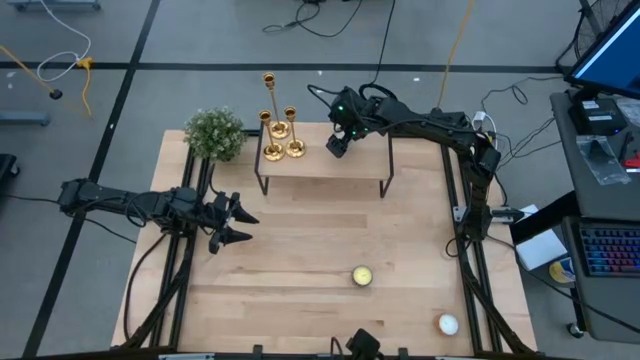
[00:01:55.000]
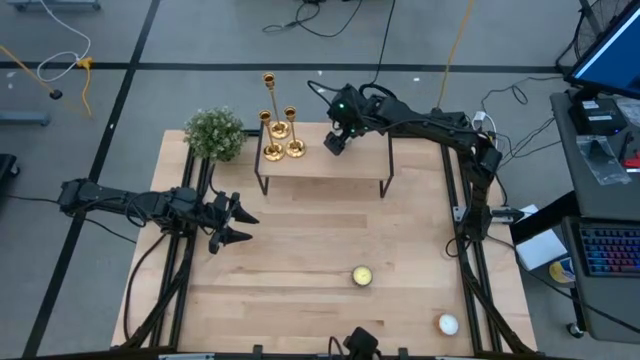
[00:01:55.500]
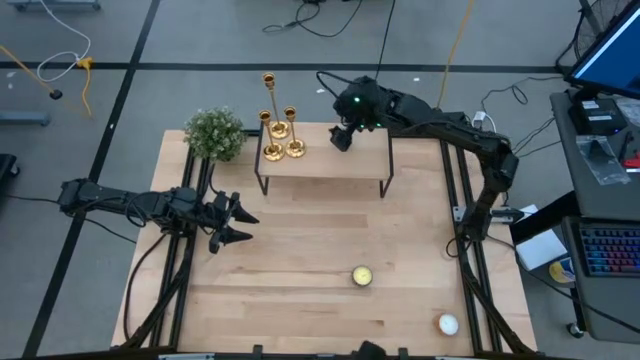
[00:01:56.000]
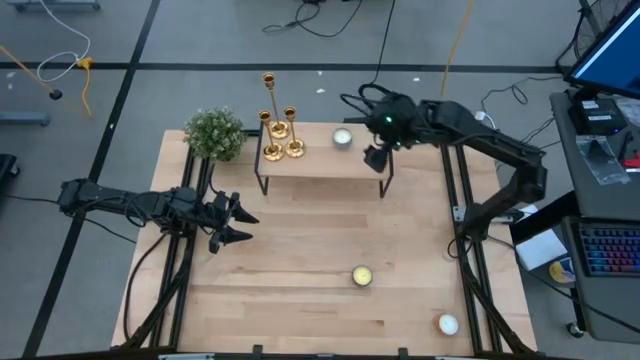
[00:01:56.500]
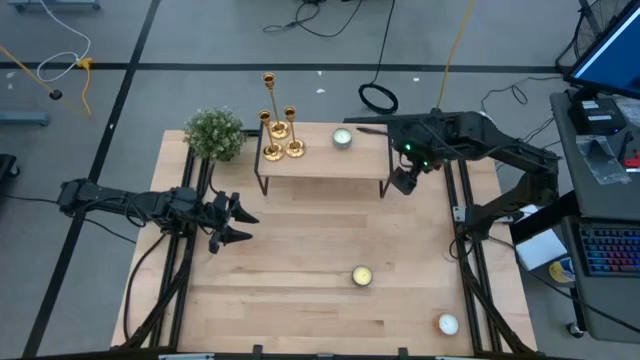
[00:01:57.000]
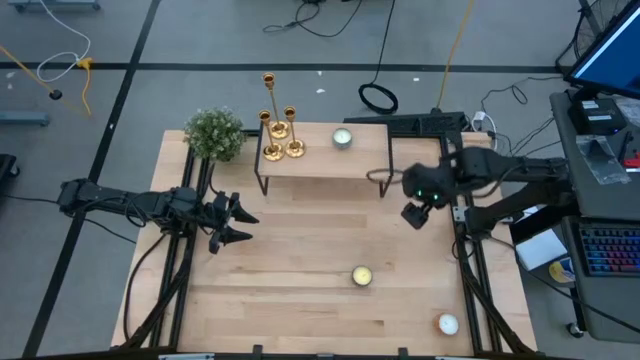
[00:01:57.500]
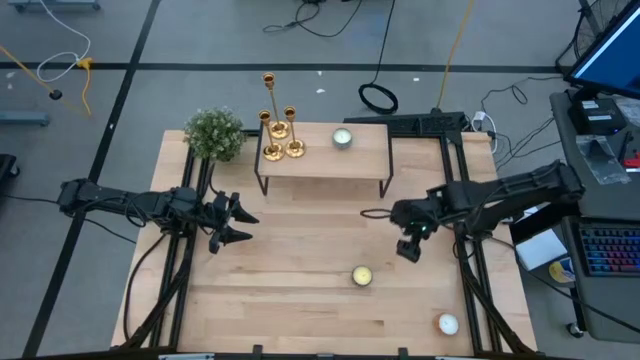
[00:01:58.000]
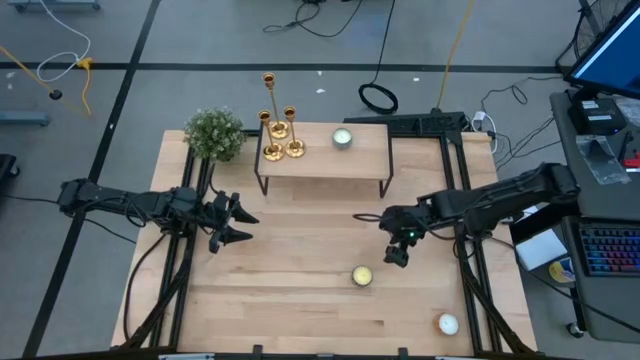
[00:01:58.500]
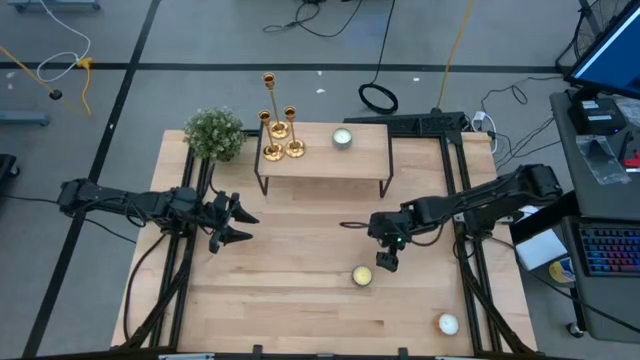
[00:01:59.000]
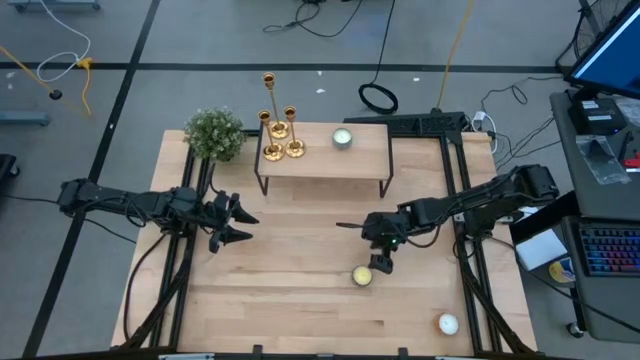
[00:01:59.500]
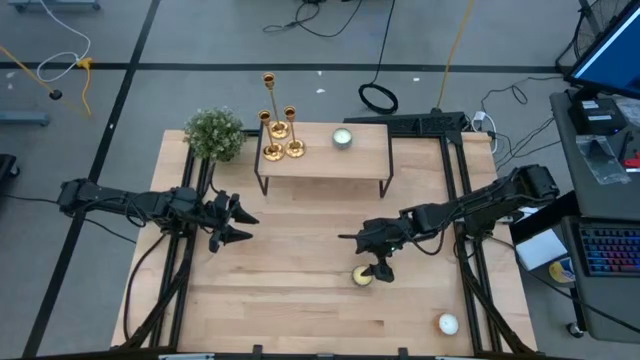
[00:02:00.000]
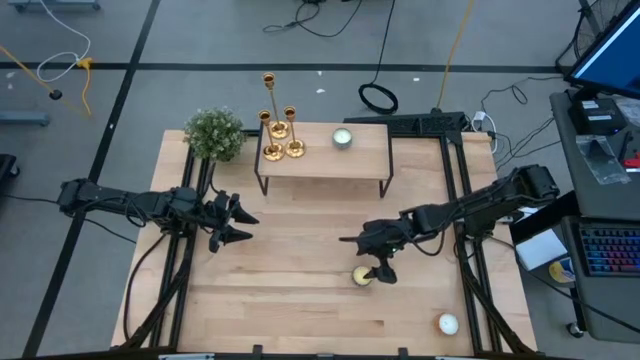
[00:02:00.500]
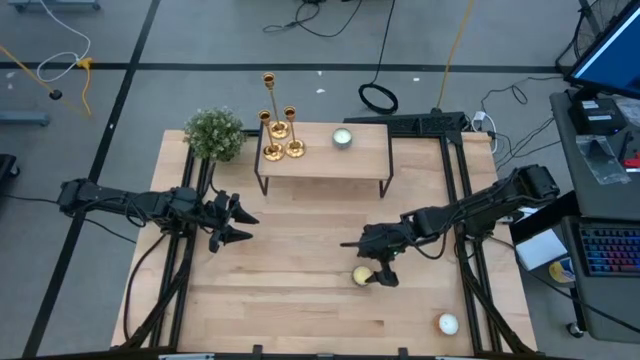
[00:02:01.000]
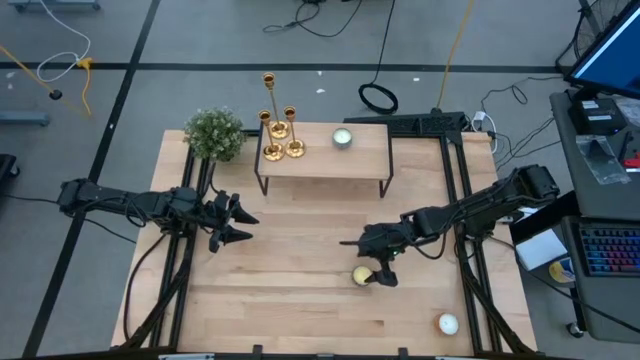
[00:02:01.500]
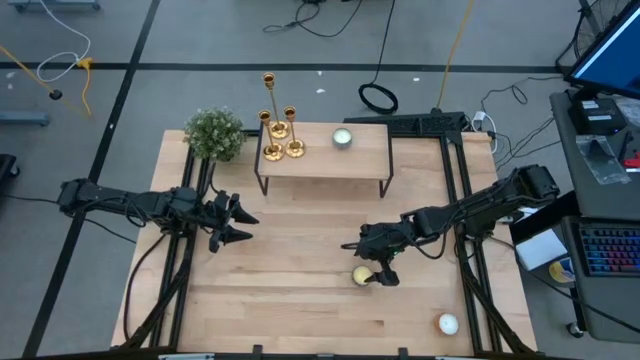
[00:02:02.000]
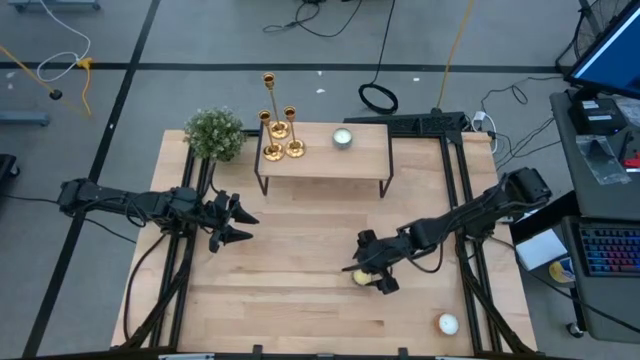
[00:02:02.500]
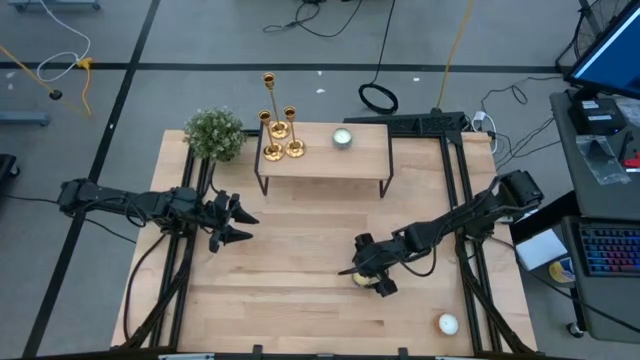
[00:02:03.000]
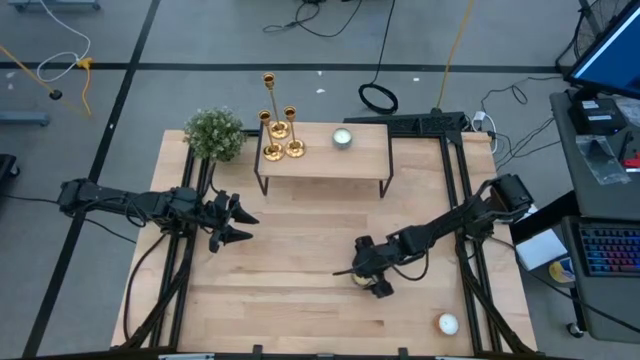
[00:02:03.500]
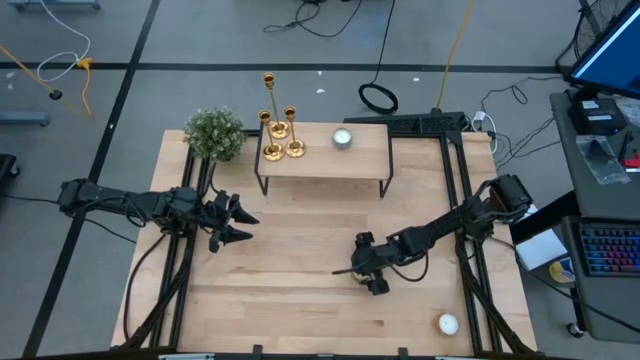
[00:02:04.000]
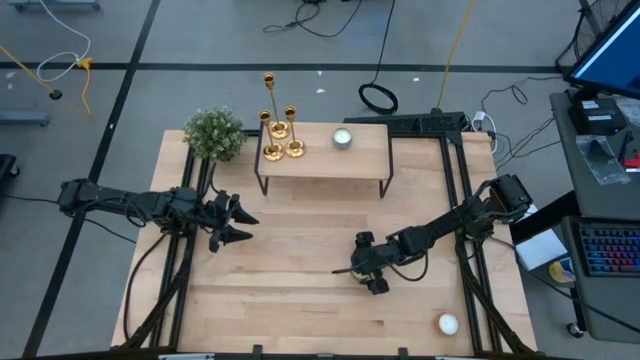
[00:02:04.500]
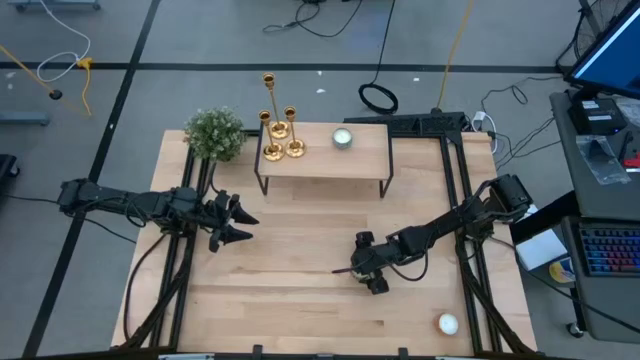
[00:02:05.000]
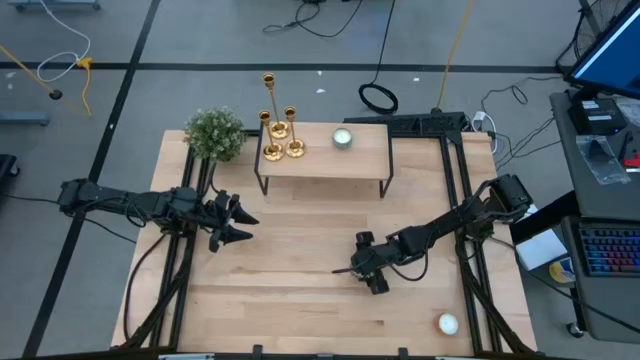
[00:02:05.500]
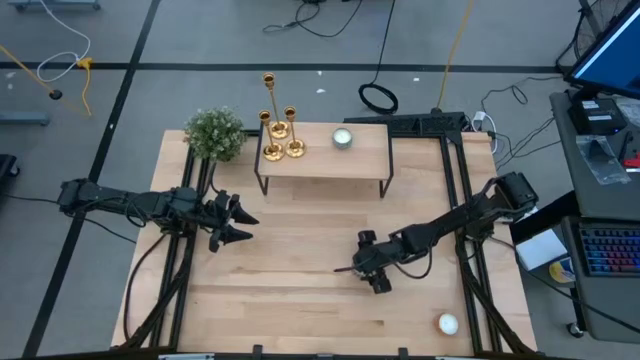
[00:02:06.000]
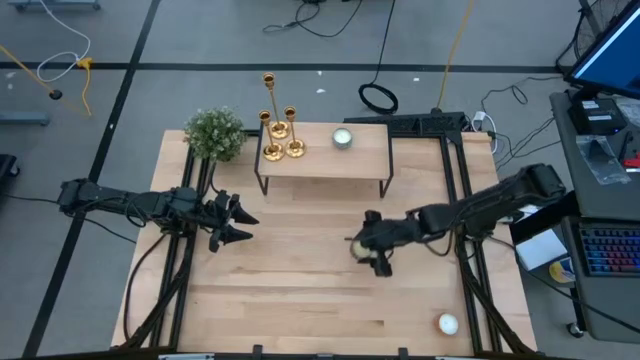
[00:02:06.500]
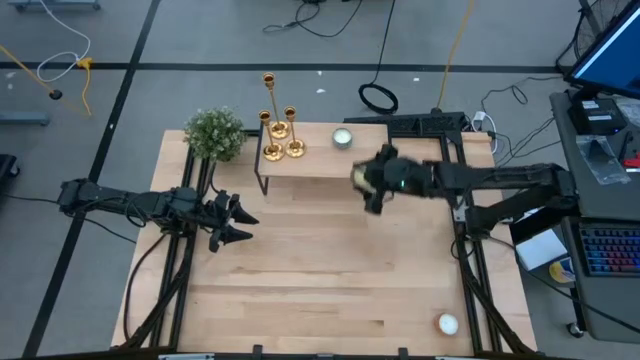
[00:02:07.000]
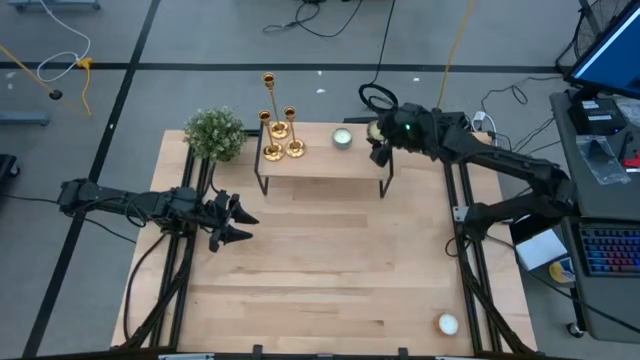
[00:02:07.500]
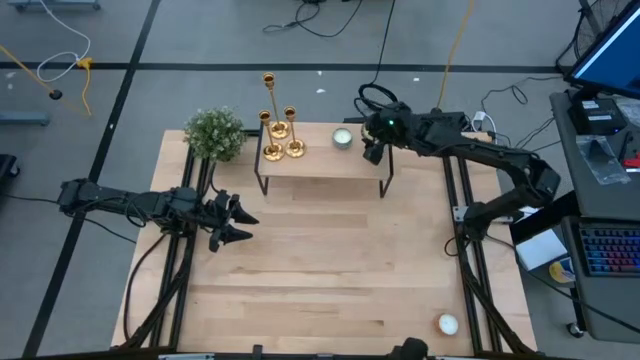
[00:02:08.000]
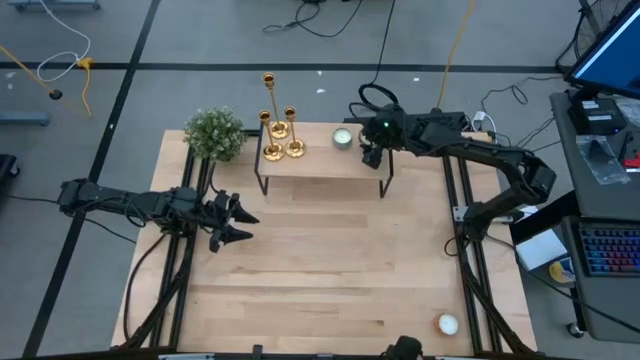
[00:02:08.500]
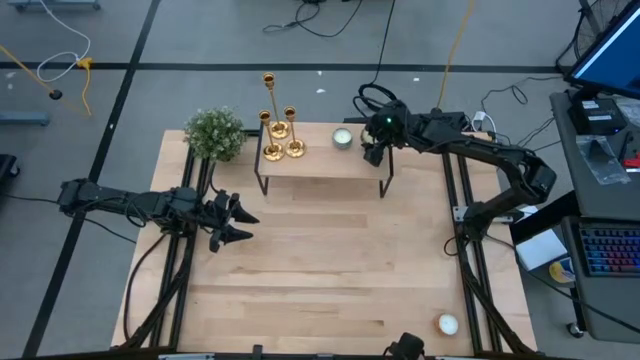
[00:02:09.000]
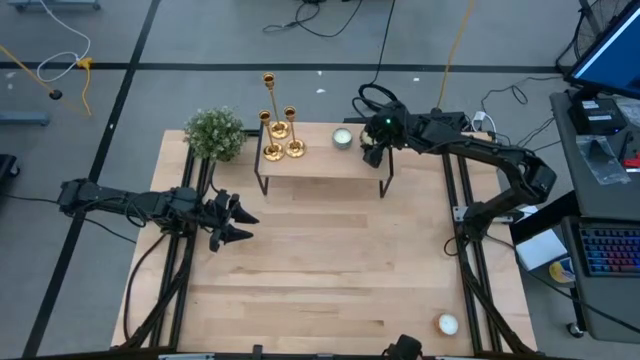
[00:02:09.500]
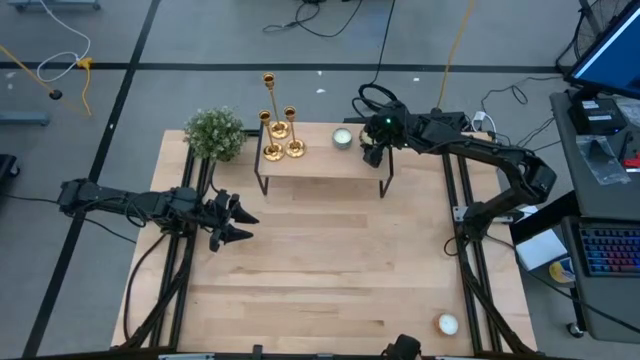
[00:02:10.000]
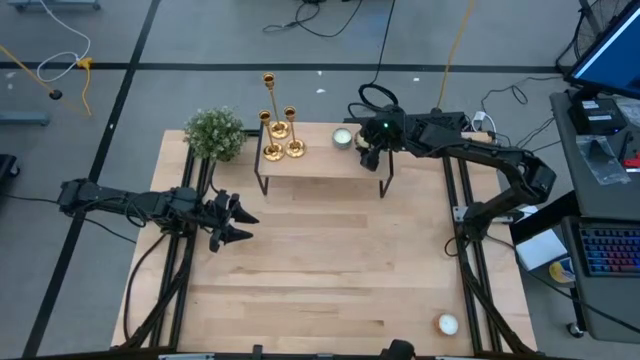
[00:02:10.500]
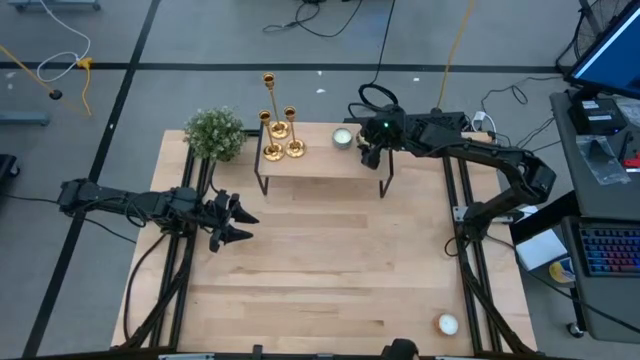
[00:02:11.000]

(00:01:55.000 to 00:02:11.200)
Task: Pick & Place candle stick holders
Put the red scented candle on the shelf
